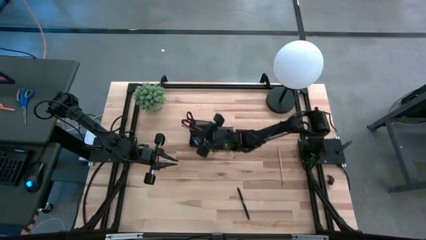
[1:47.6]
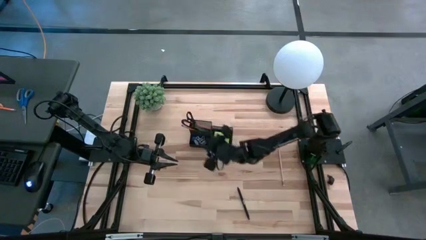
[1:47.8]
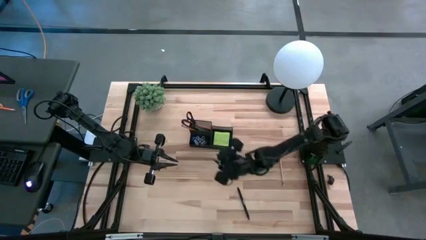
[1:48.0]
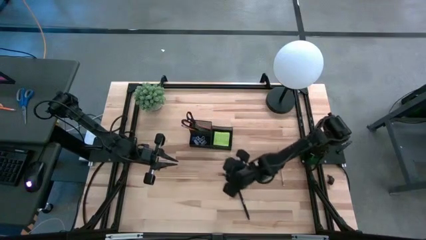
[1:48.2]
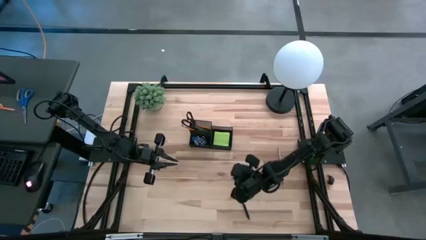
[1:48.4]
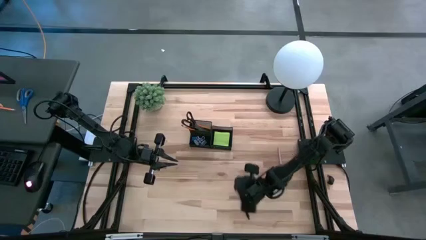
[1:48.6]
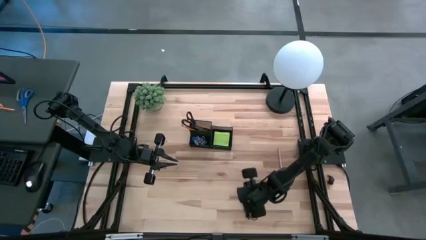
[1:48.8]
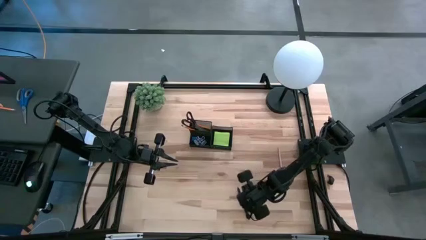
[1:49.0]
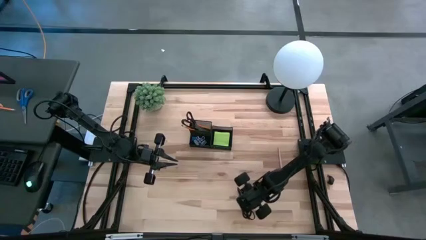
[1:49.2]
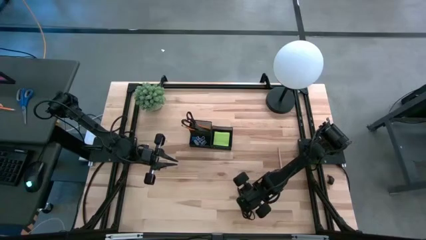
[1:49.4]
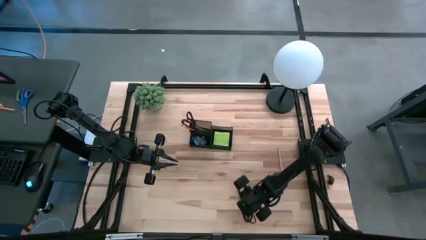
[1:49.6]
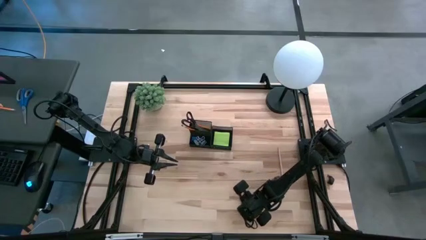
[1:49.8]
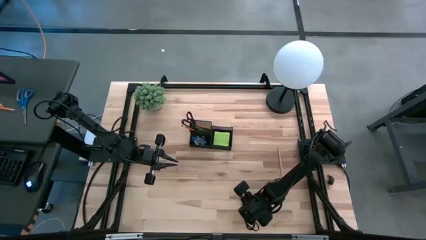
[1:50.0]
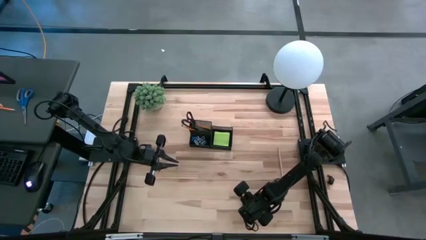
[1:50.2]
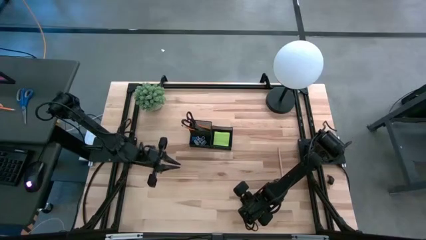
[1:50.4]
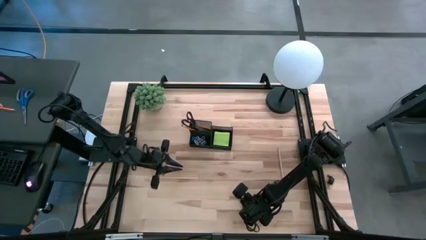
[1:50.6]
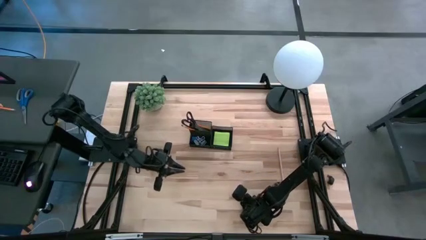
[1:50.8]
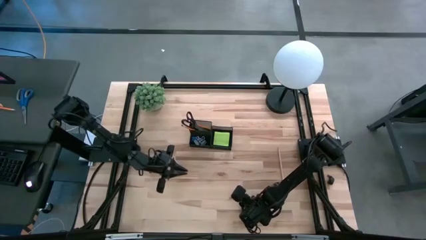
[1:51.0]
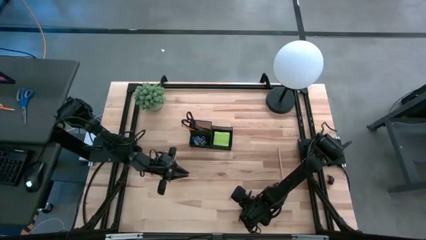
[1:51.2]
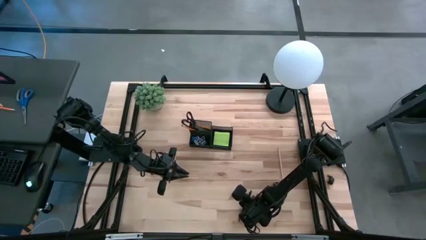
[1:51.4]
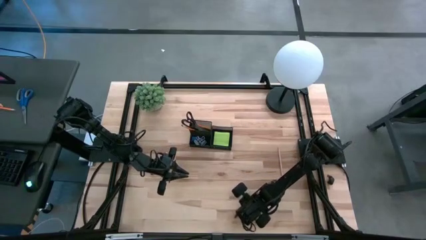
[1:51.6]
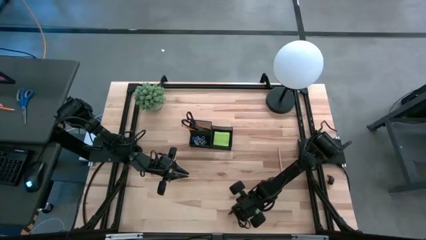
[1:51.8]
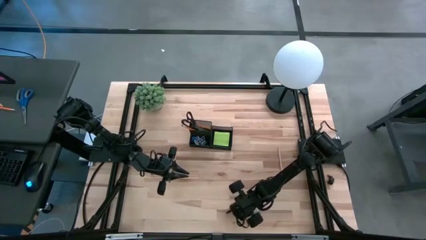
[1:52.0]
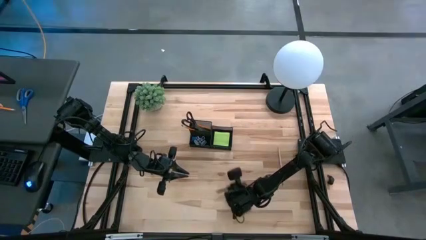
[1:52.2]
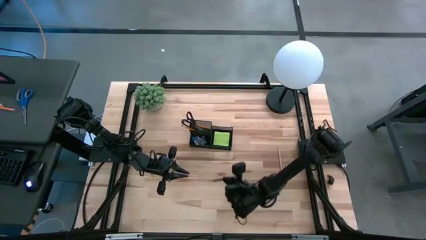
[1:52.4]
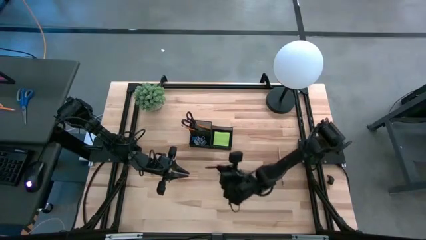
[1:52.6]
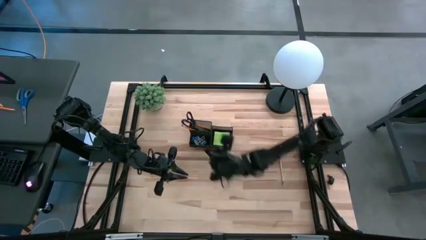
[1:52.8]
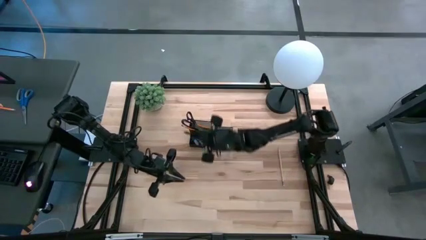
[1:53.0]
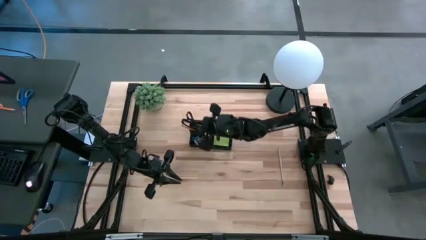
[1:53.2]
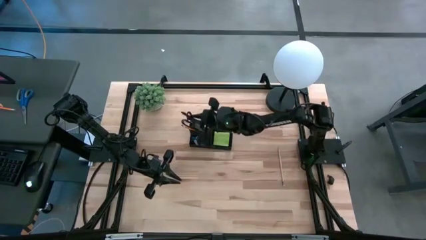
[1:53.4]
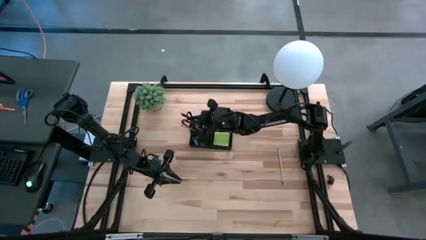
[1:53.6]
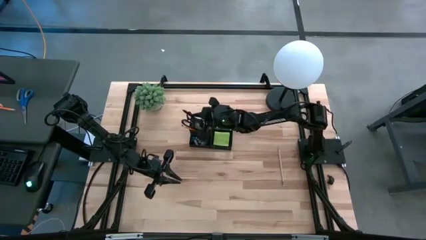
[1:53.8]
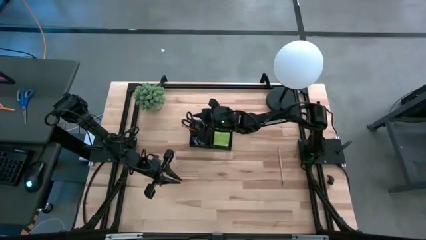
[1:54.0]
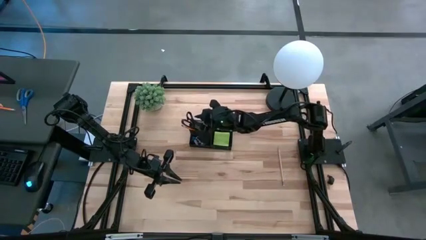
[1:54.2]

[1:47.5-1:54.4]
Task: Pick and place office supplies into organizer
Put the black ball pen into the organizer bin

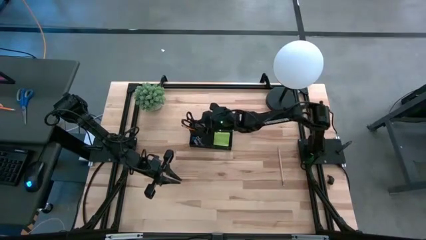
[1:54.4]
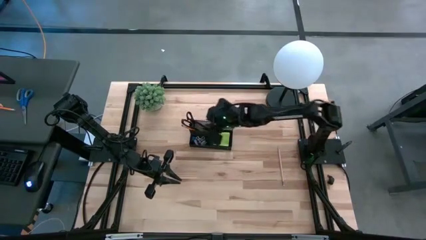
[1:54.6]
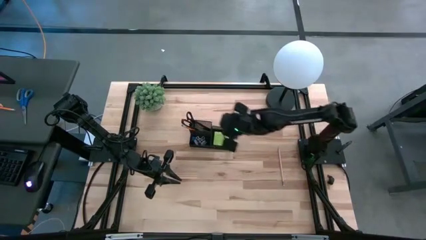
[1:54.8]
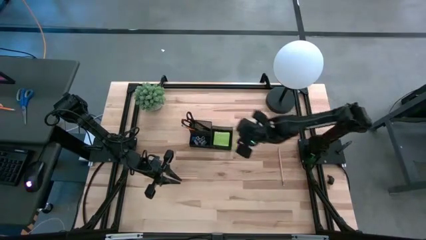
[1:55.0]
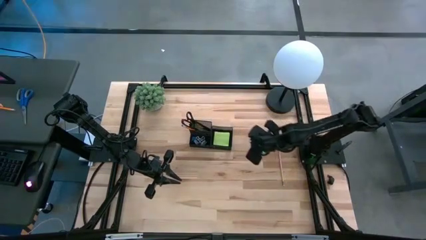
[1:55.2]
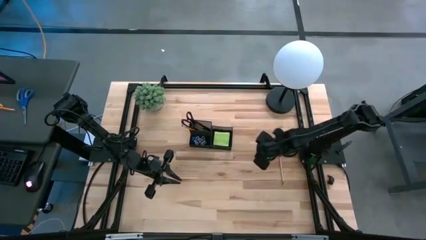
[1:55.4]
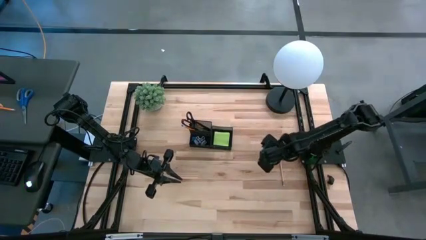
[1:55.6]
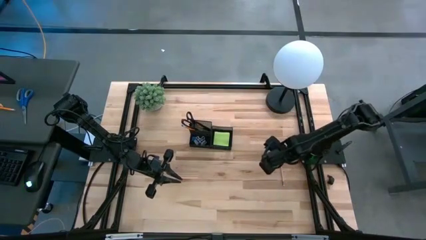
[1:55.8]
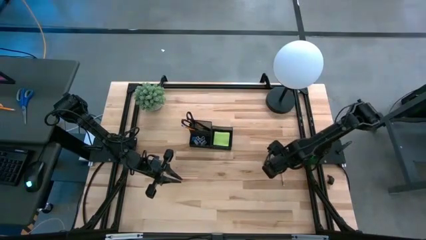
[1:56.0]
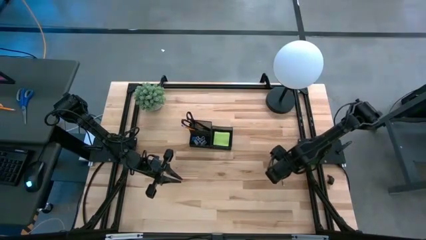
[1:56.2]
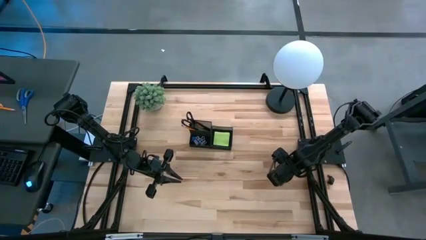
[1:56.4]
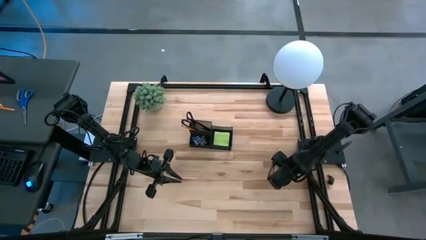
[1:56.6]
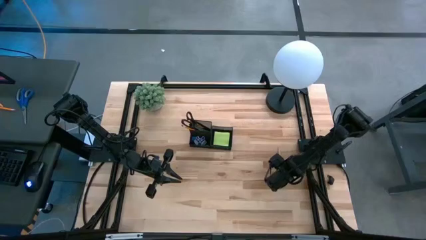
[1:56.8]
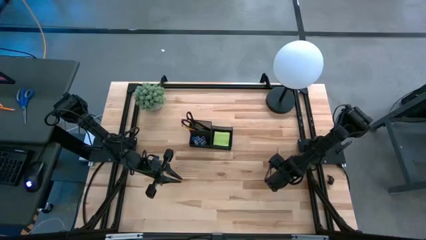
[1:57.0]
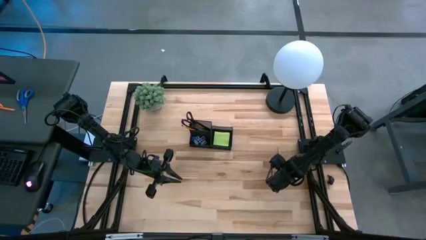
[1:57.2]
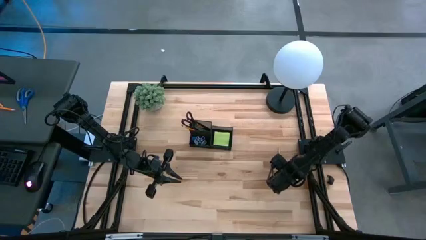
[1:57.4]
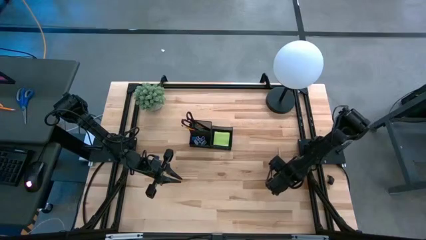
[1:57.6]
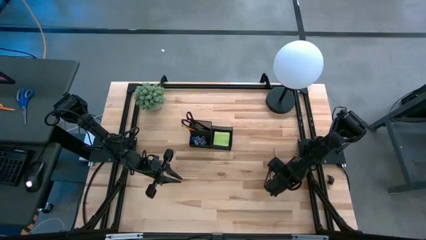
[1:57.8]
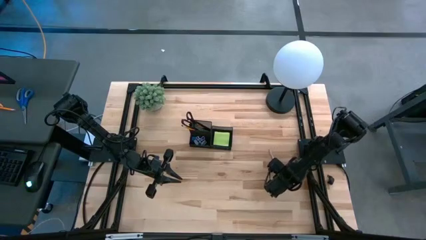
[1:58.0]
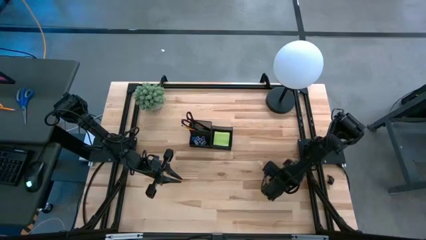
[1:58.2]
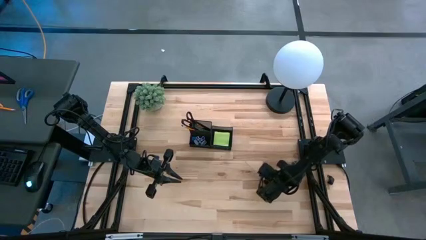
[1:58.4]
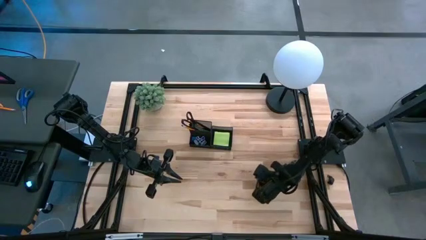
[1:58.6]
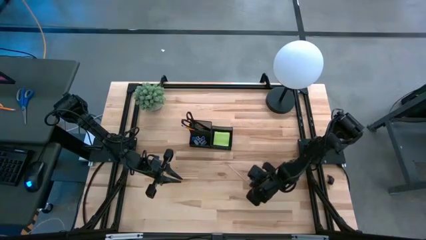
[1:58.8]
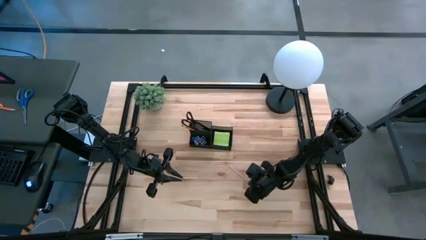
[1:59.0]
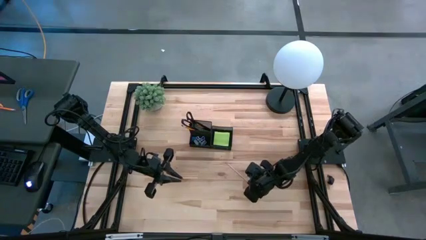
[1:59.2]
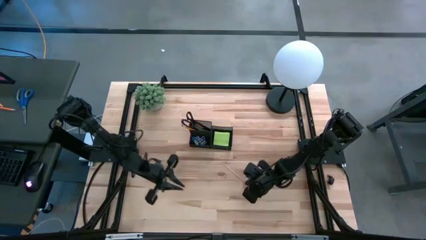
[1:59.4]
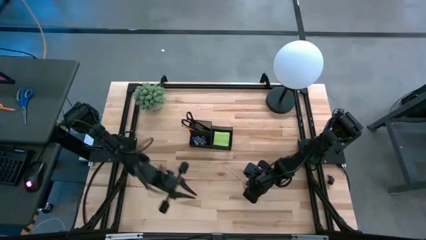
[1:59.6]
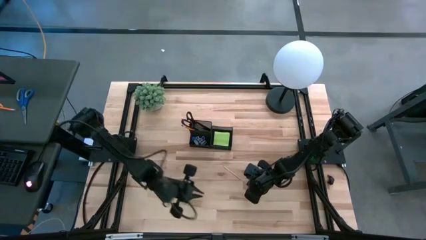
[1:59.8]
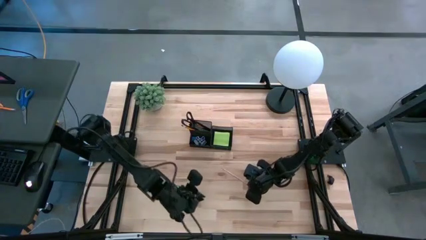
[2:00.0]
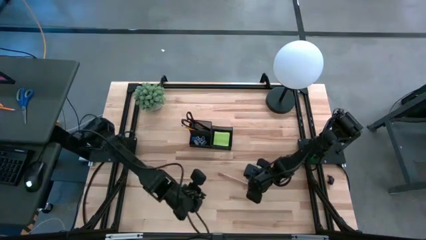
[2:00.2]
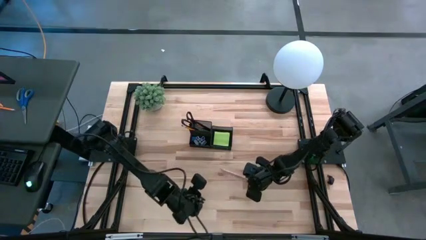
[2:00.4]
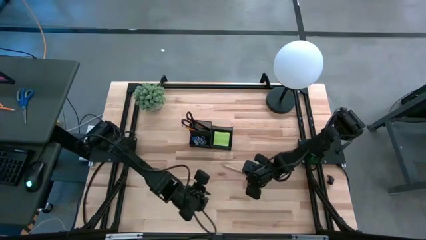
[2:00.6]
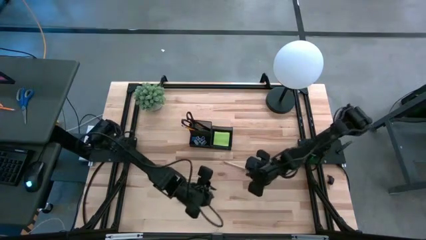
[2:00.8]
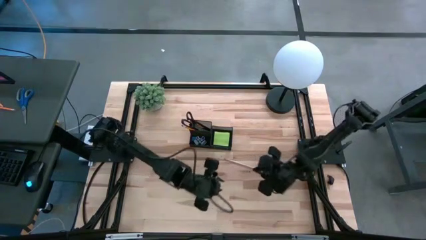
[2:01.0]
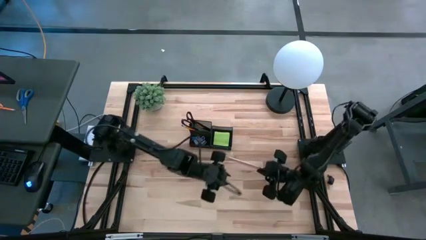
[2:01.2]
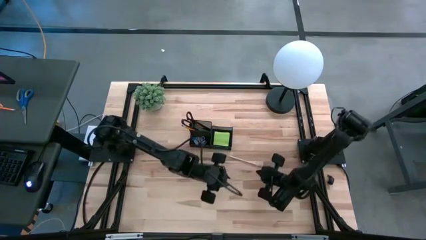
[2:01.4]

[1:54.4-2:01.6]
Put the pink pencil into the organizer bin

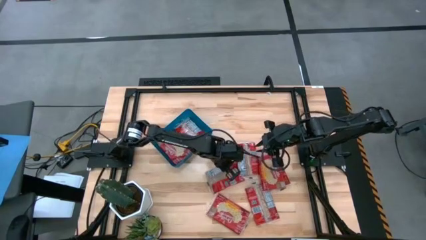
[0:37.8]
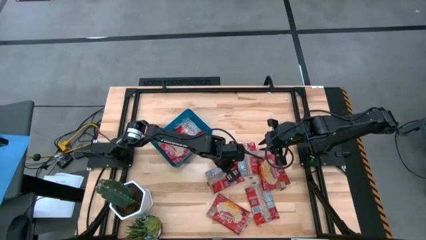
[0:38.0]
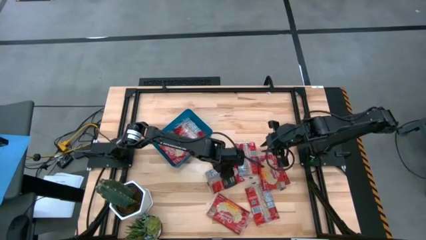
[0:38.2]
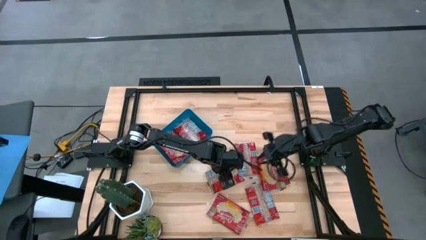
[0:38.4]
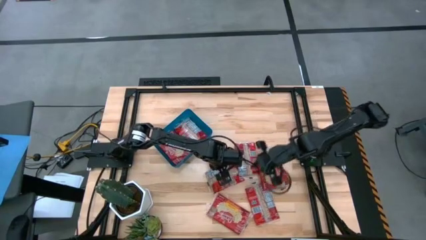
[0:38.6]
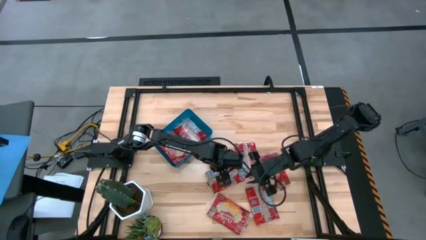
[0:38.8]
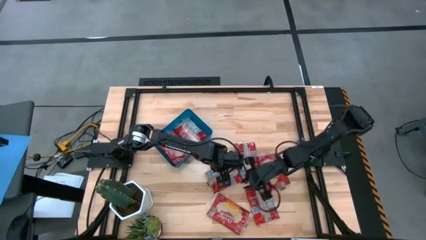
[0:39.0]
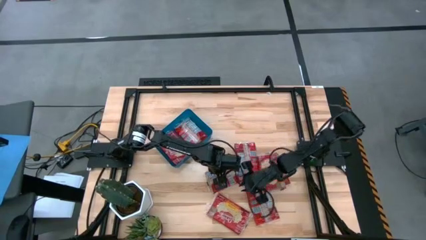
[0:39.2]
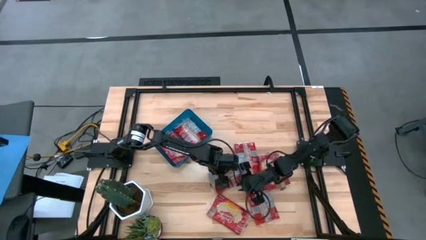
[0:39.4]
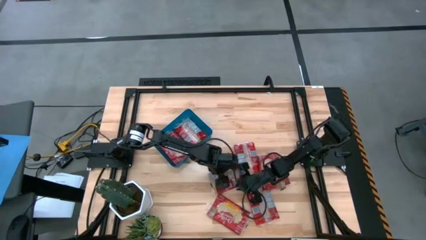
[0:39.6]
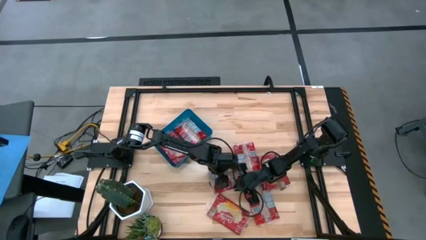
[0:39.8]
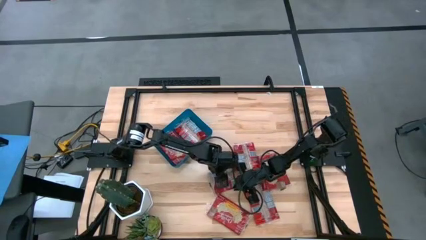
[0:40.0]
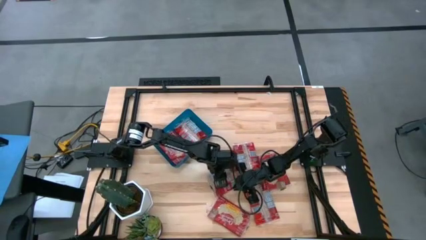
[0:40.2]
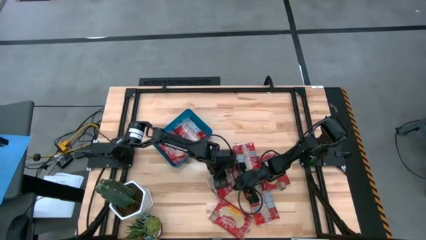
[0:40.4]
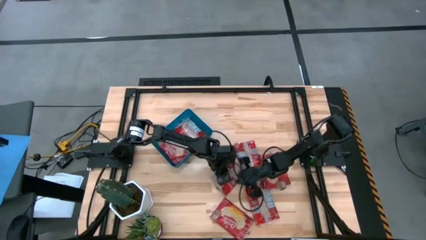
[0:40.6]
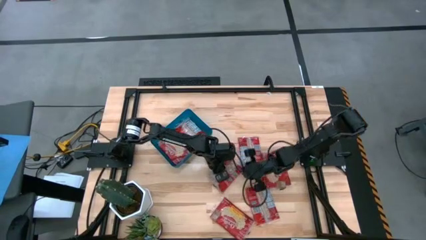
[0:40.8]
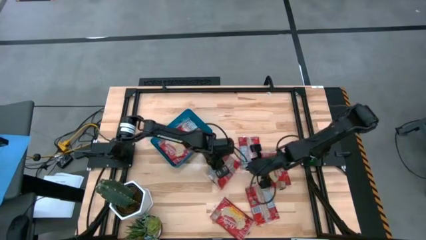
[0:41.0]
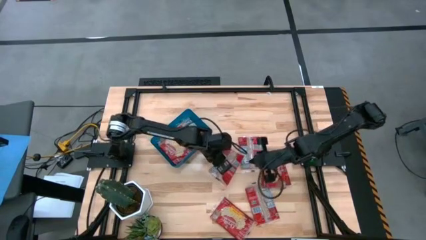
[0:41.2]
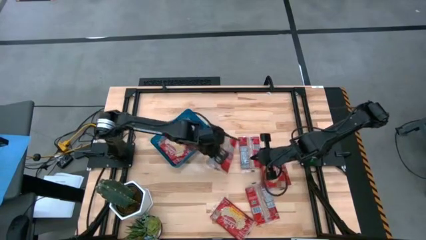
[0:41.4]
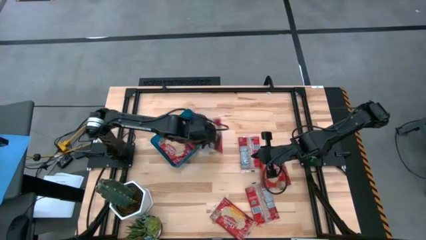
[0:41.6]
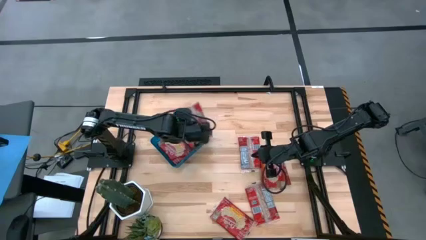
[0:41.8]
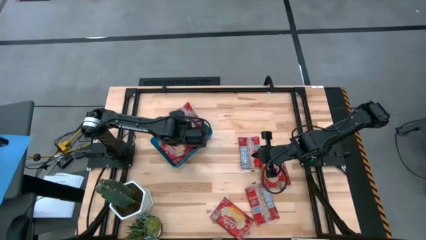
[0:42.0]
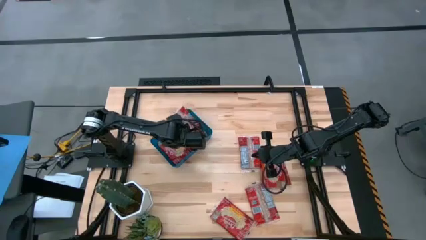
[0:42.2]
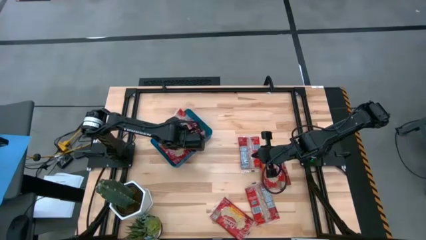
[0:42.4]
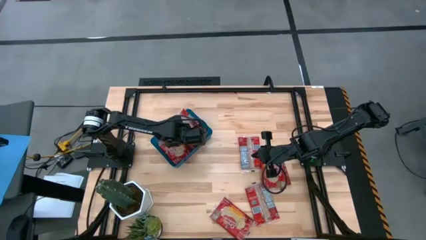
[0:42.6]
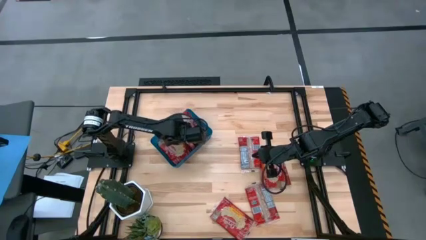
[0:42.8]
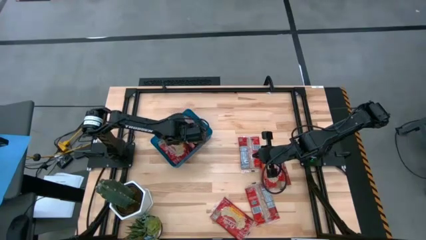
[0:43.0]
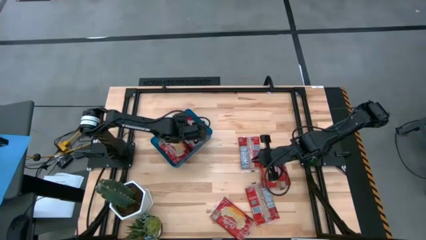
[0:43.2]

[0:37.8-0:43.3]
Task: Sort popcorn bags into baskets
Put the red popcorn bag into the blue bin
